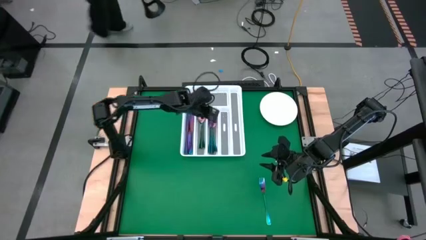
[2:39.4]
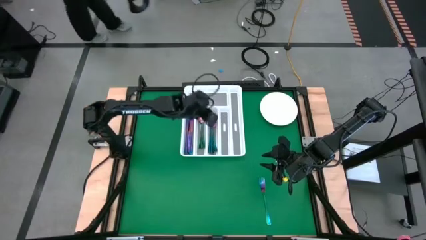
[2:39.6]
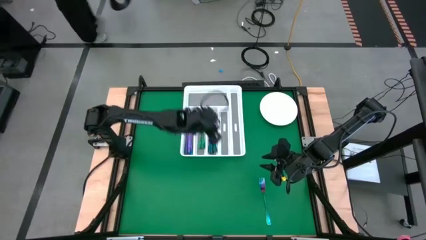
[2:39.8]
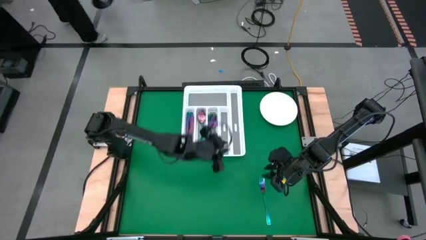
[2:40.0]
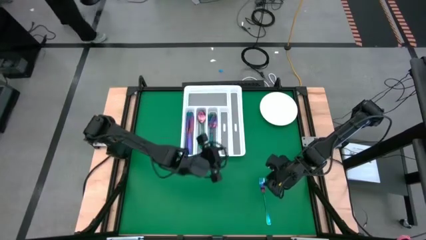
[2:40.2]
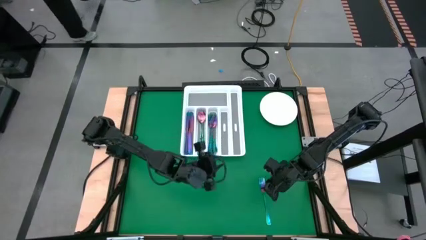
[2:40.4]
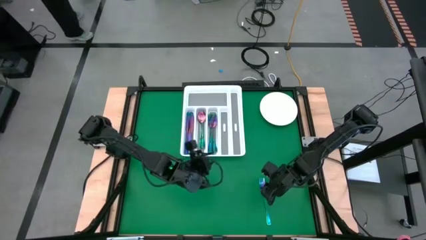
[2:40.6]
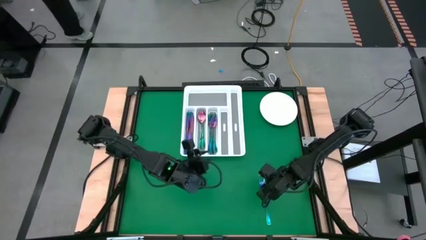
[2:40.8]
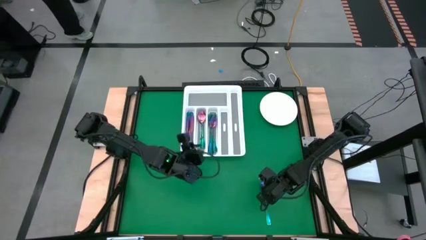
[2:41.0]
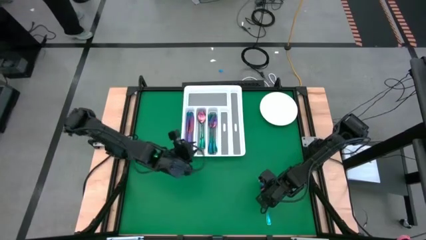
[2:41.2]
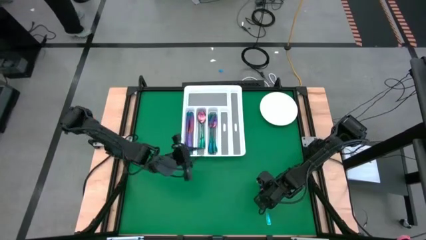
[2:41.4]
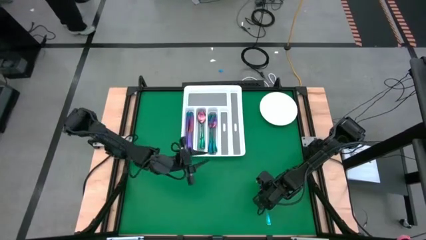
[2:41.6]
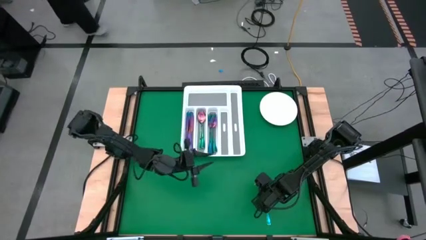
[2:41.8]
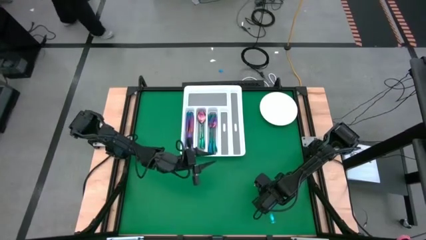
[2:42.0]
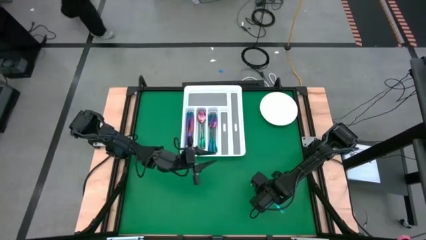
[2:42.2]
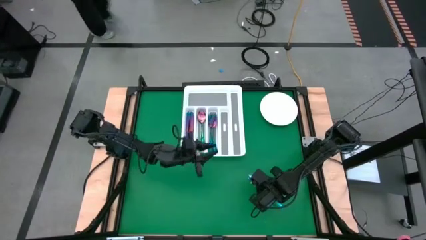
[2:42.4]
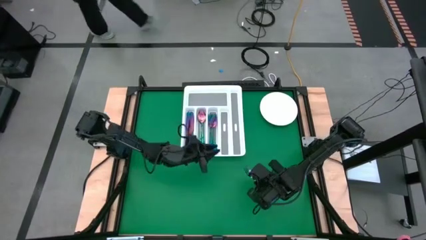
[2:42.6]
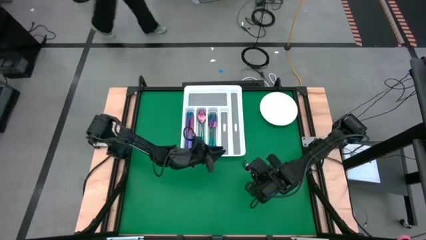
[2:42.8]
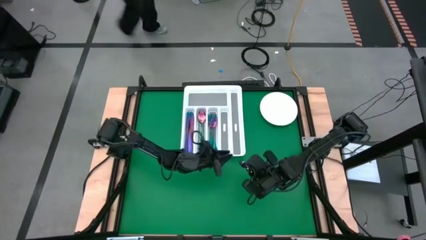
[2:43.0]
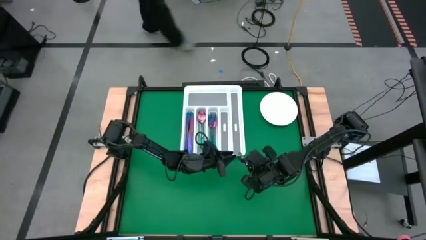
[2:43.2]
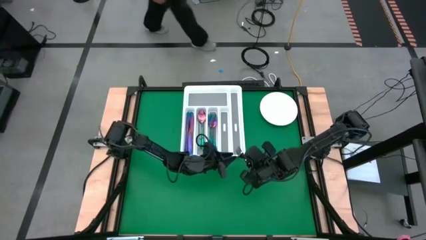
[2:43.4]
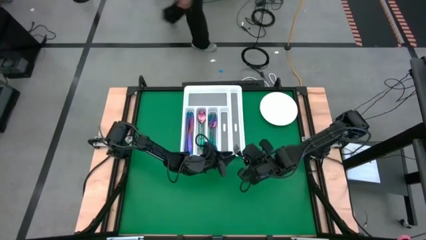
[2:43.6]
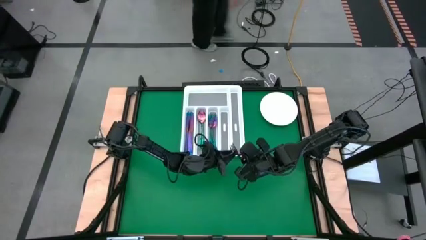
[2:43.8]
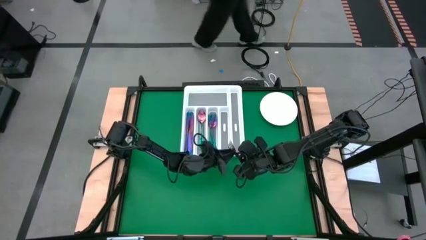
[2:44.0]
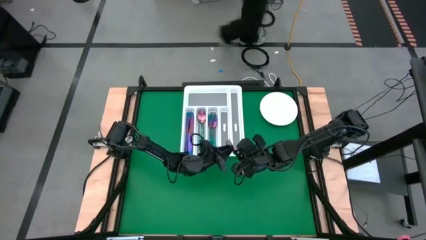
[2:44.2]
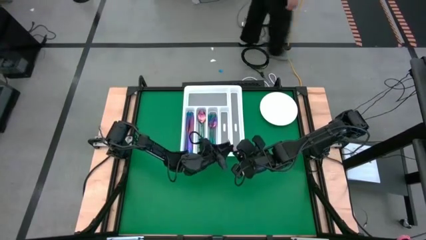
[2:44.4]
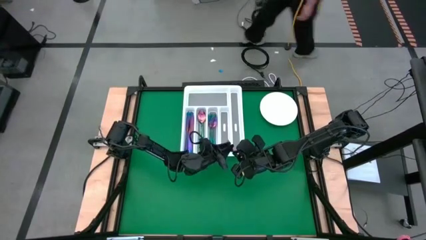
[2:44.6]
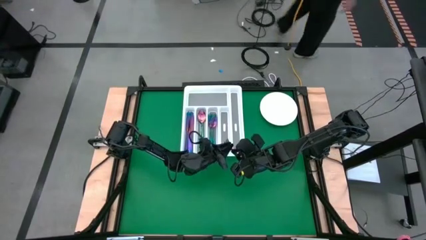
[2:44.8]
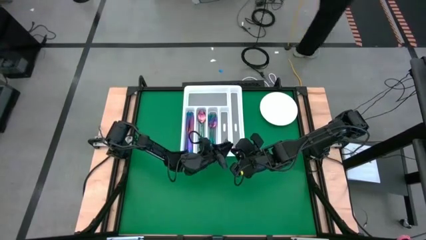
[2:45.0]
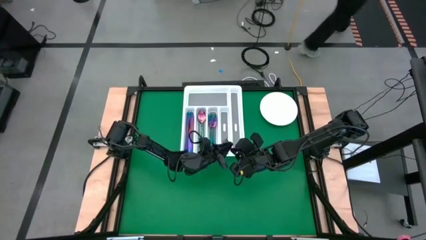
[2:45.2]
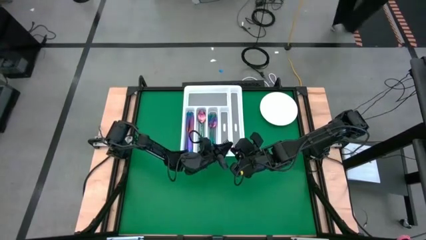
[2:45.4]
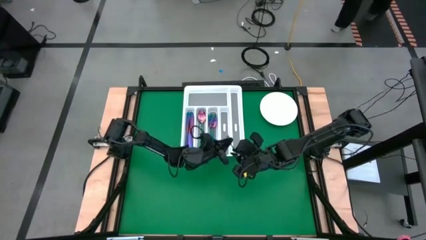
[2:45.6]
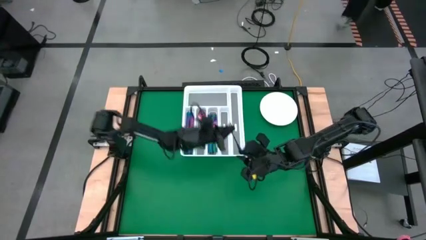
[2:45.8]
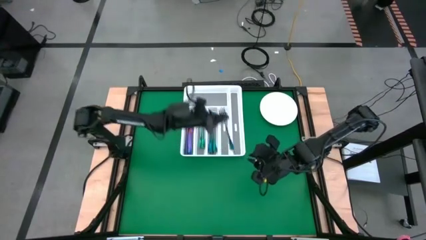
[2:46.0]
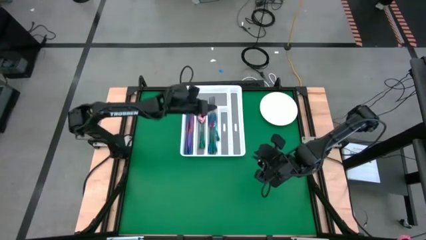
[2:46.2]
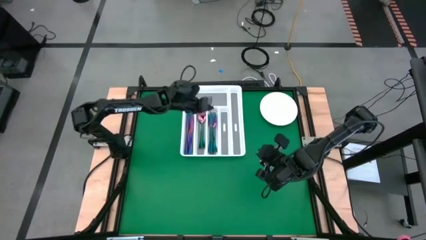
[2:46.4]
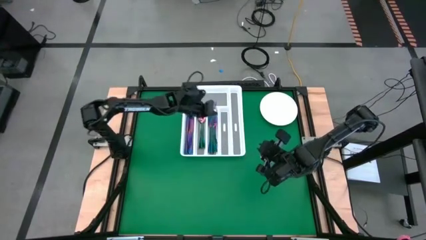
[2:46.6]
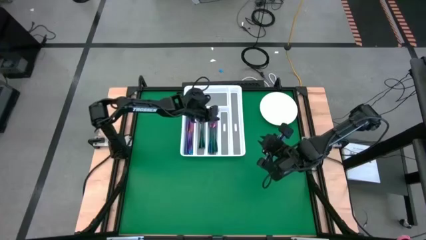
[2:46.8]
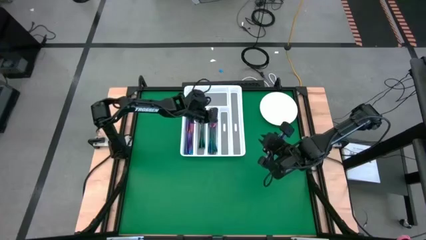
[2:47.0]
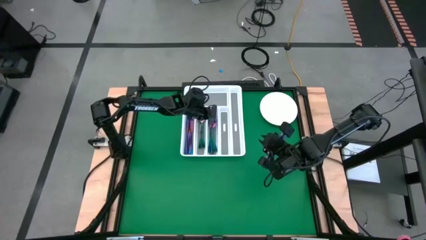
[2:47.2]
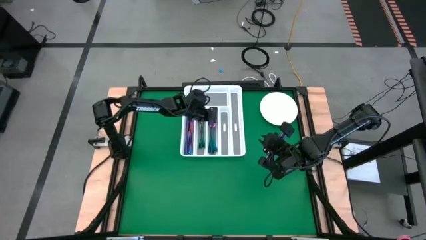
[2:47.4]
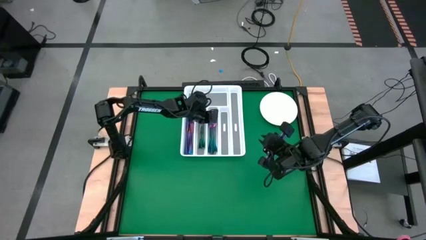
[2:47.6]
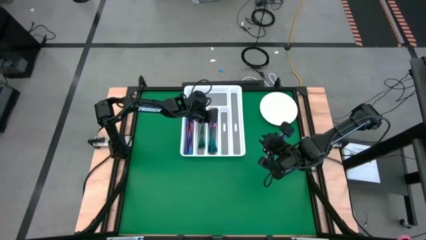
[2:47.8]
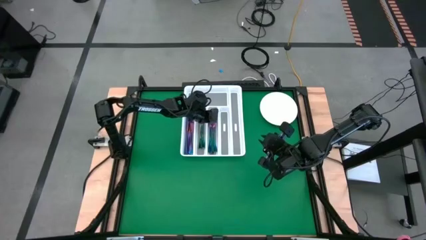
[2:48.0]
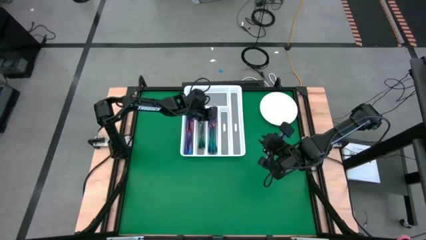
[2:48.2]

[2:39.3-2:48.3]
Task: Sort silverware
Put the blue fork into the silverware tray

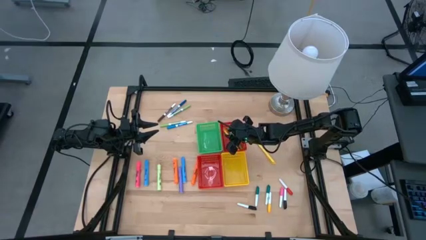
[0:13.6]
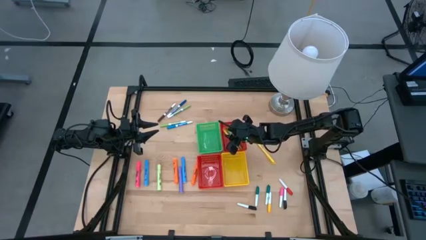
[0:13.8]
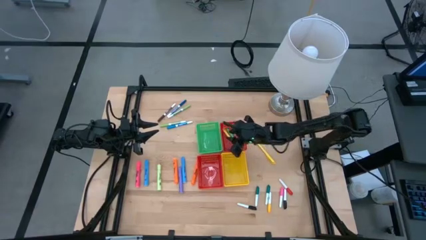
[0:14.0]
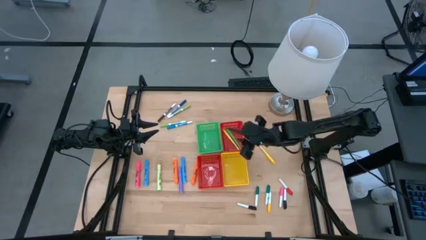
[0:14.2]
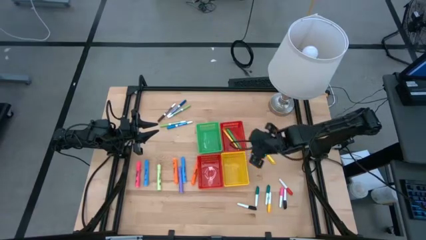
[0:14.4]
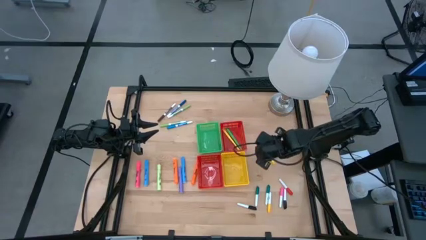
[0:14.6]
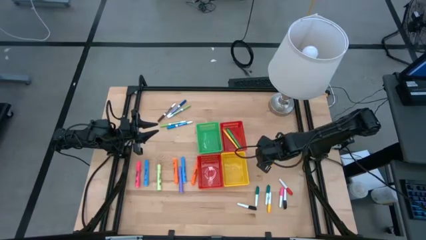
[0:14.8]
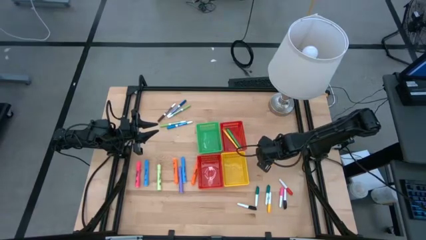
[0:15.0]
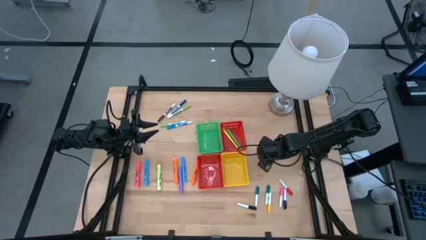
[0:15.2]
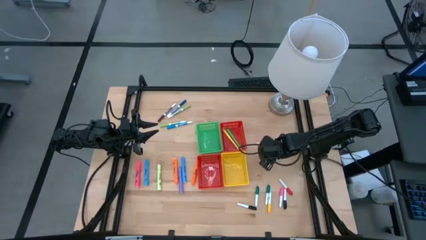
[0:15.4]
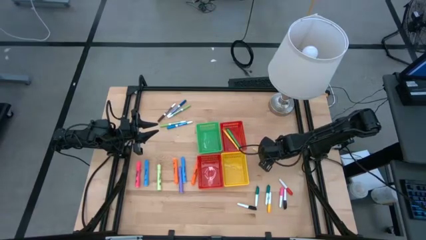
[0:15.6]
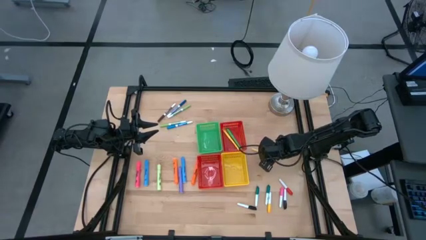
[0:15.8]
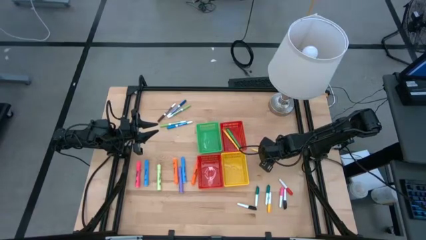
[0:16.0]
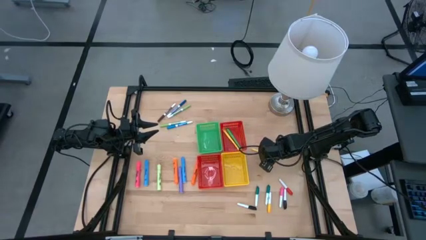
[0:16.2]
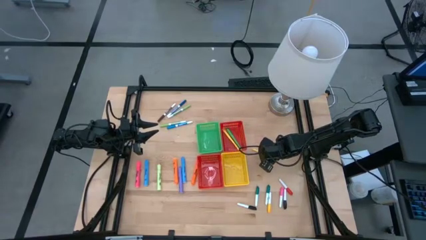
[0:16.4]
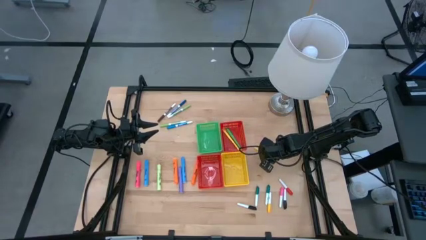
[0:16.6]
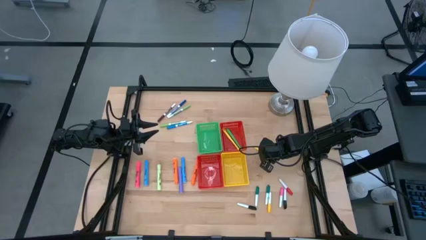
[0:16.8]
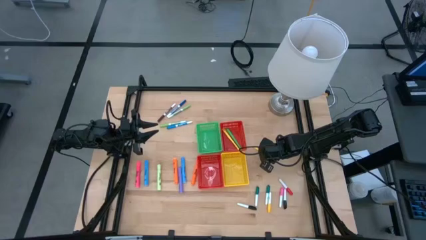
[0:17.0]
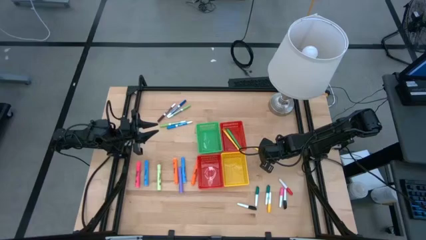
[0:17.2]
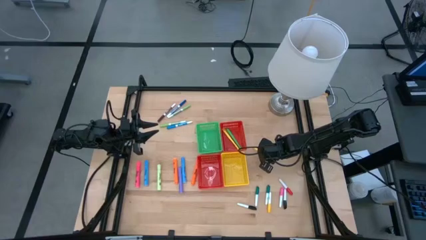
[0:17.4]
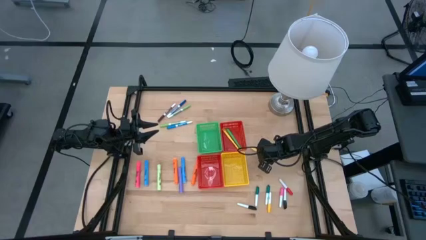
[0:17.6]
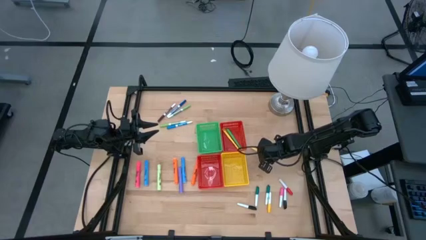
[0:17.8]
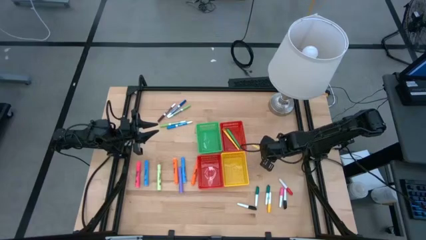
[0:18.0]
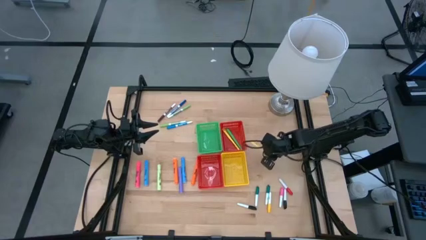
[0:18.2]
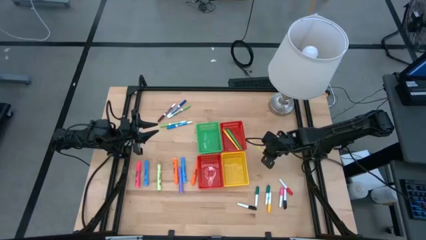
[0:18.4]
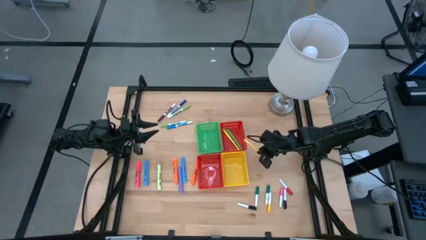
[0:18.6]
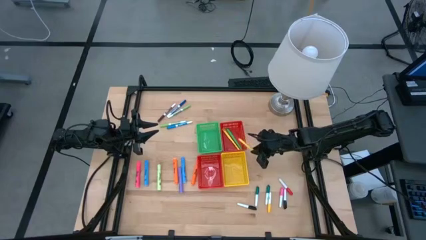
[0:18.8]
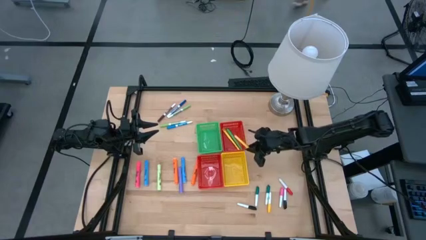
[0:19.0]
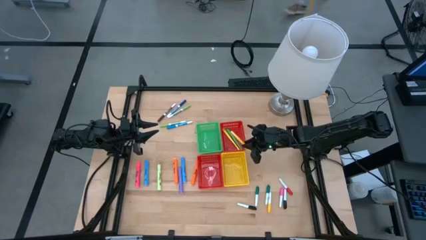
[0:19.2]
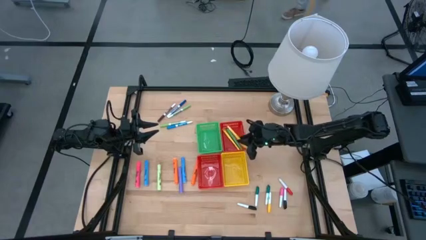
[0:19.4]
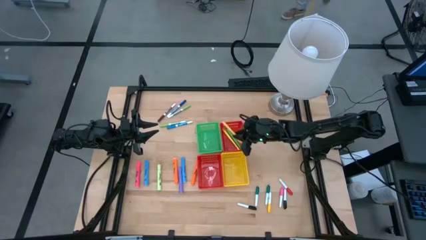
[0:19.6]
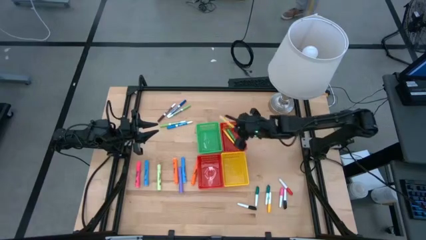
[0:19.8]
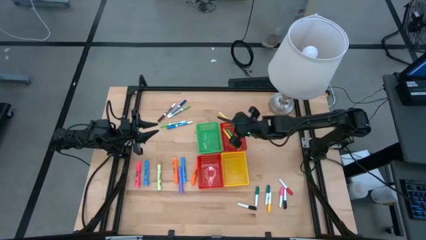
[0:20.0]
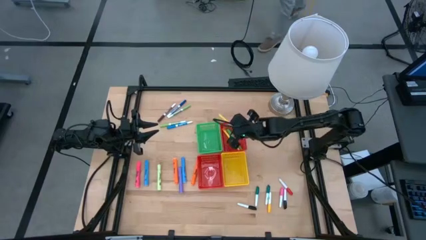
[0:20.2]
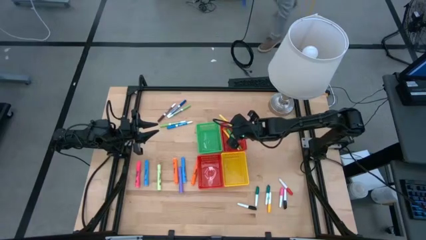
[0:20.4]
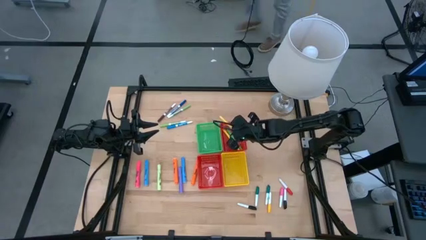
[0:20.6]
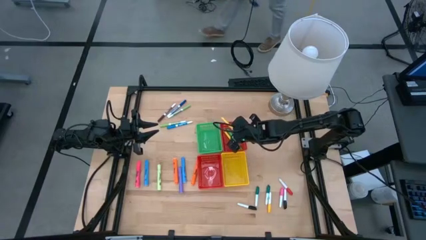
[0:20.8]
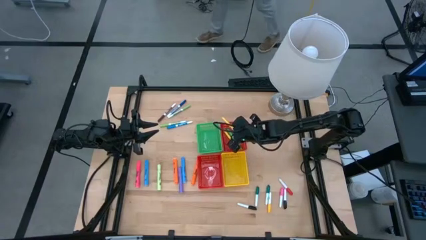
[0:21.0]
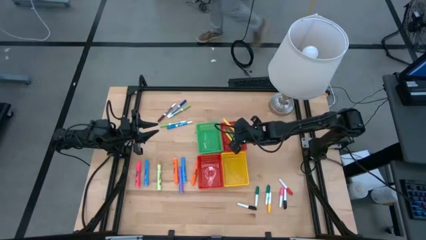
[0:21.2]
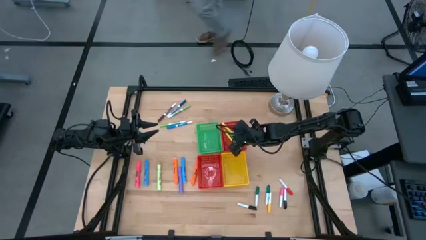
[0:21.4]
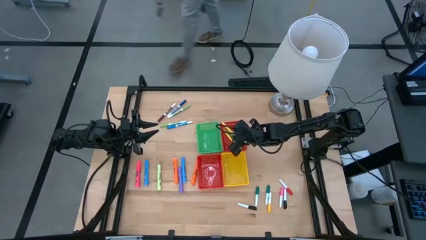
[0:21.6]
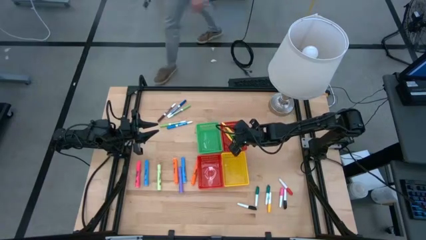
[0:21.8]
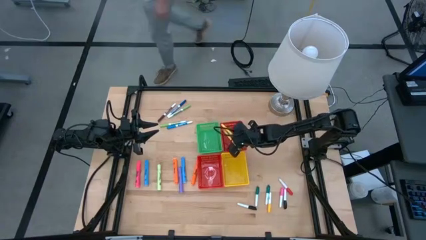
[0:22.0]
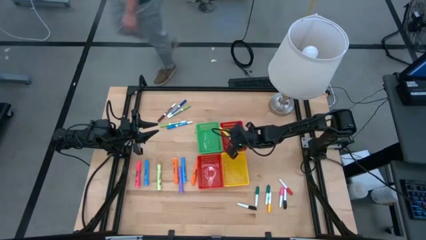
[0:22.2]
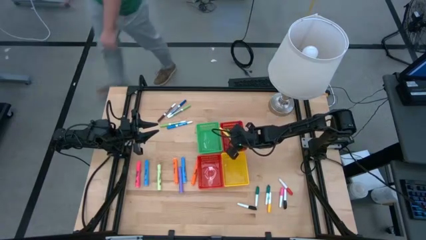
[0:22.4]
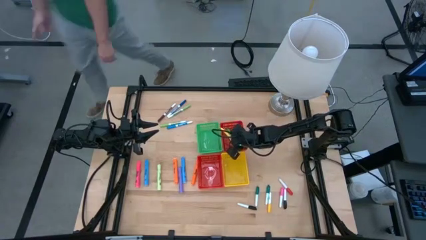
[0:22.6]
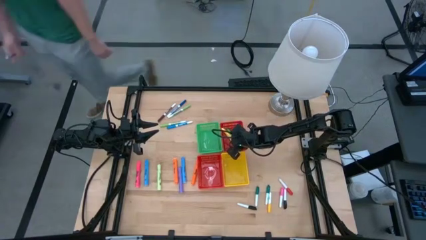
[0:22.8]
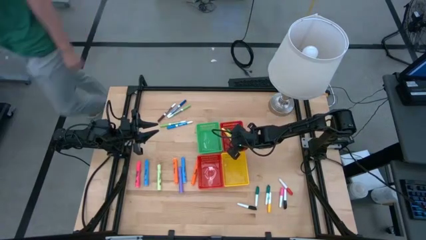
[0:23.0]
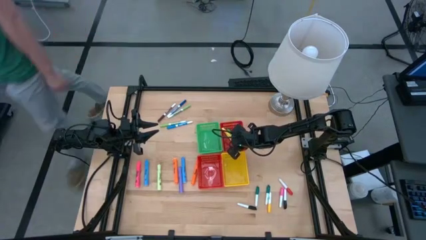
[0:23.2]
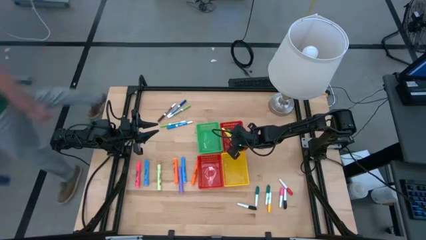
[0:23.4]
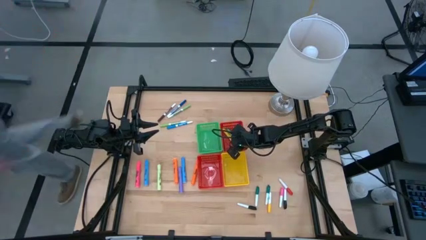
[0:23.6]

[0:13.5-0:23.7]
Task: Pick & Place Markers
Put the yellow pen into the top red bin
